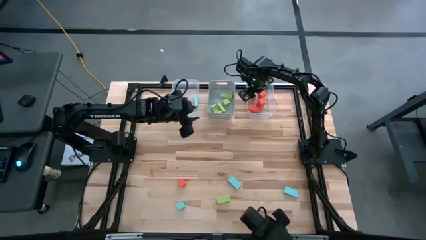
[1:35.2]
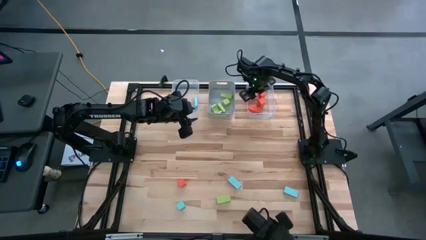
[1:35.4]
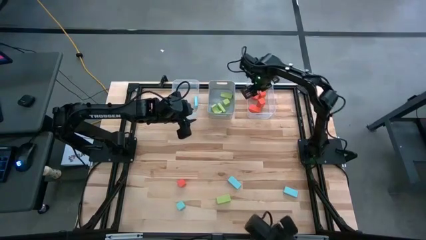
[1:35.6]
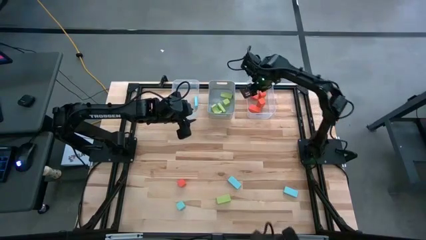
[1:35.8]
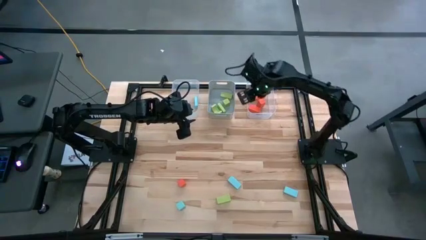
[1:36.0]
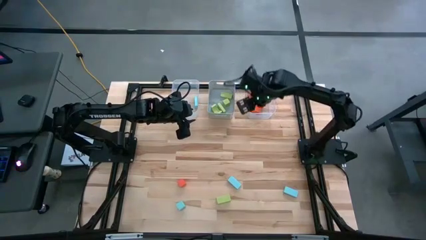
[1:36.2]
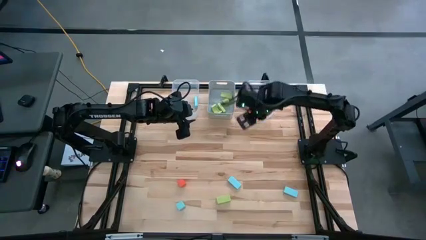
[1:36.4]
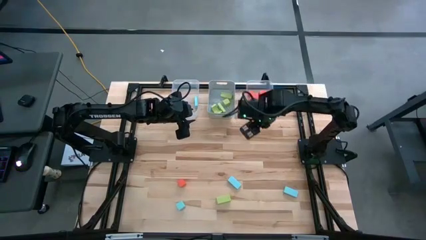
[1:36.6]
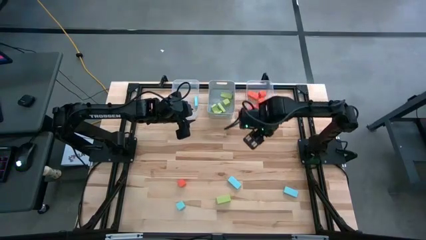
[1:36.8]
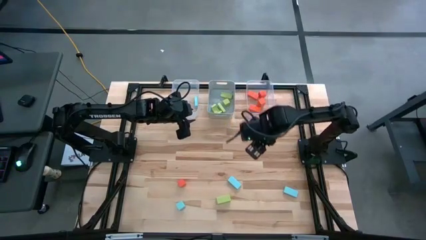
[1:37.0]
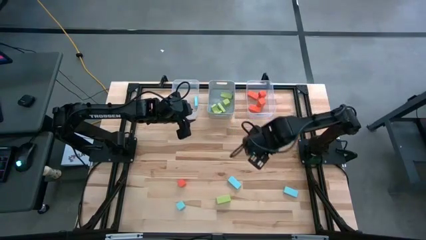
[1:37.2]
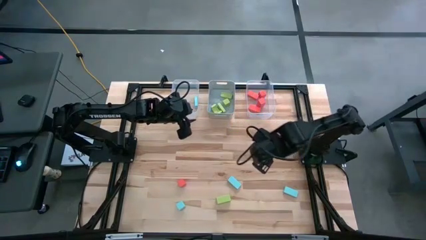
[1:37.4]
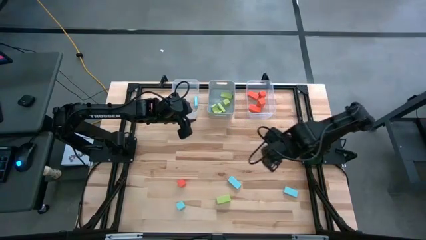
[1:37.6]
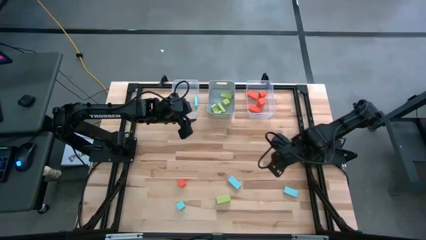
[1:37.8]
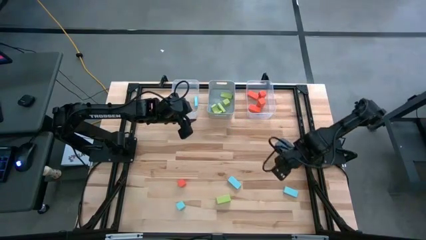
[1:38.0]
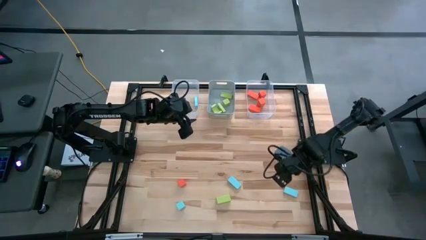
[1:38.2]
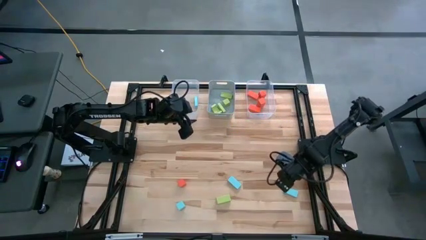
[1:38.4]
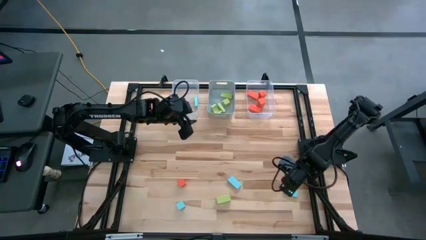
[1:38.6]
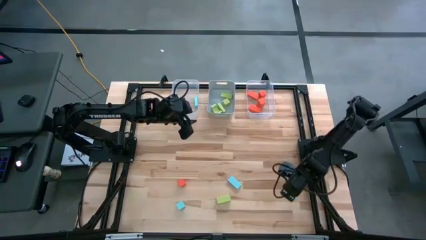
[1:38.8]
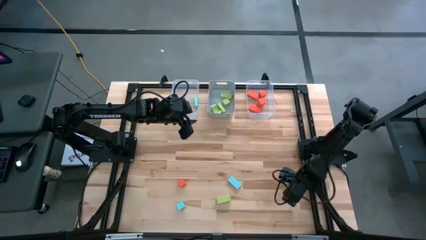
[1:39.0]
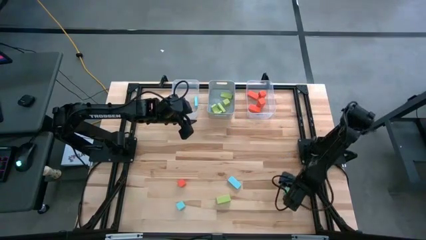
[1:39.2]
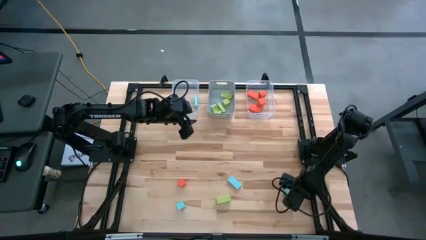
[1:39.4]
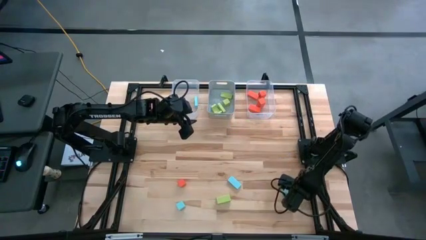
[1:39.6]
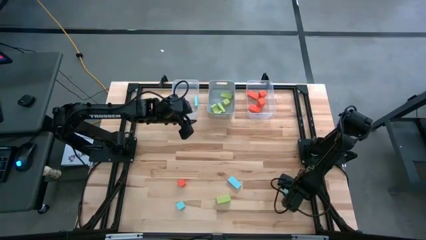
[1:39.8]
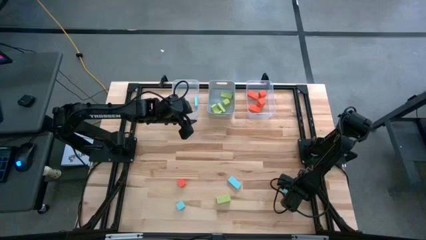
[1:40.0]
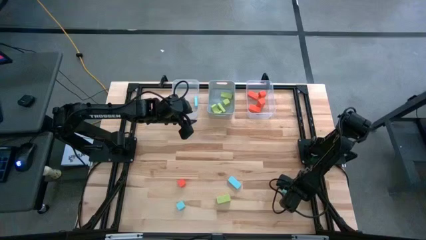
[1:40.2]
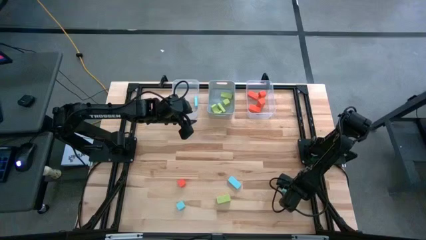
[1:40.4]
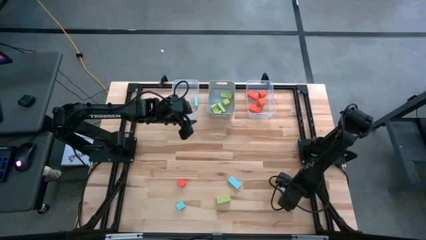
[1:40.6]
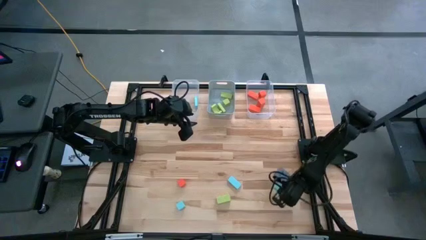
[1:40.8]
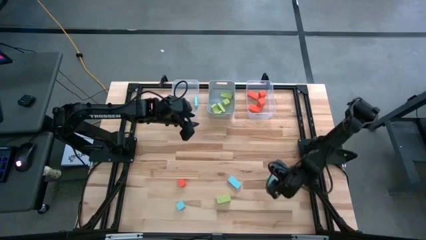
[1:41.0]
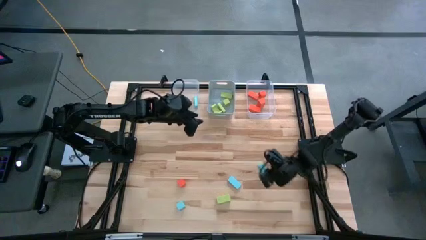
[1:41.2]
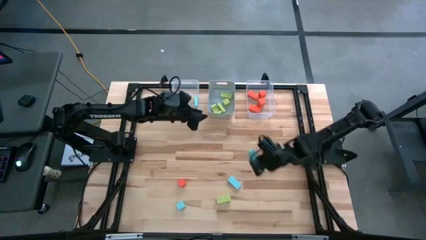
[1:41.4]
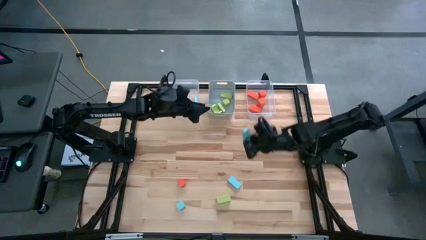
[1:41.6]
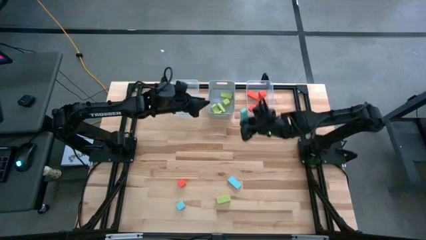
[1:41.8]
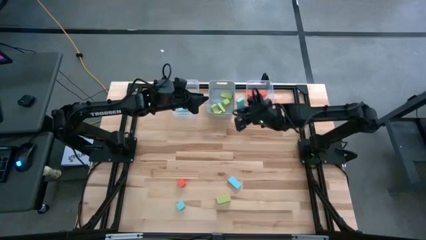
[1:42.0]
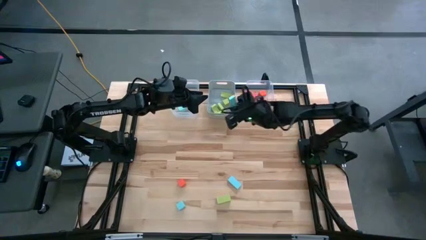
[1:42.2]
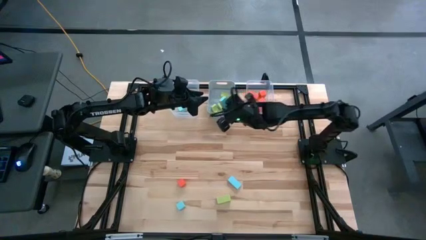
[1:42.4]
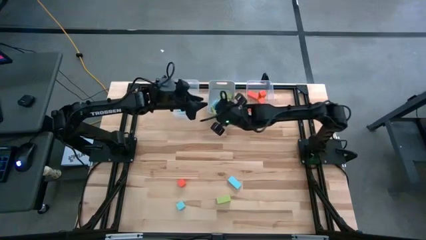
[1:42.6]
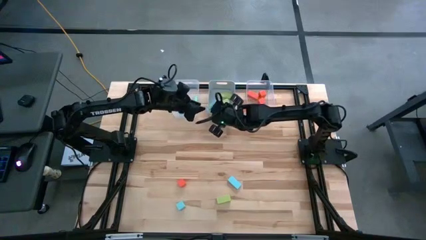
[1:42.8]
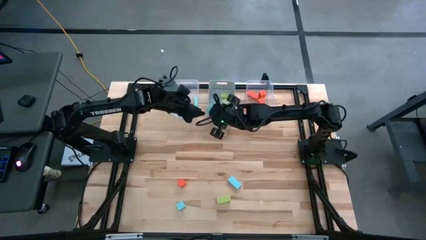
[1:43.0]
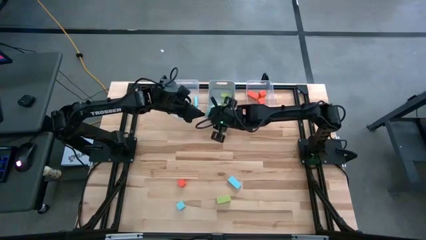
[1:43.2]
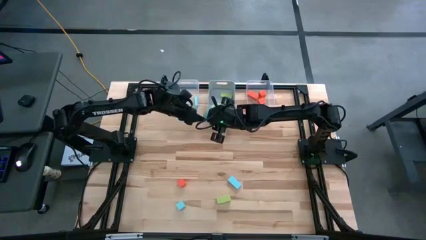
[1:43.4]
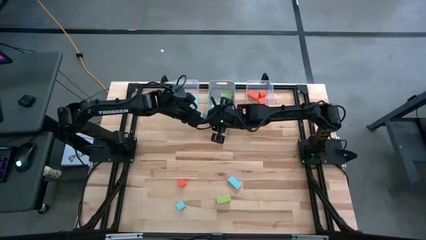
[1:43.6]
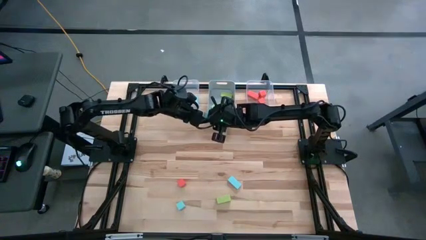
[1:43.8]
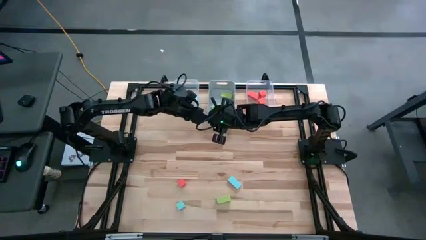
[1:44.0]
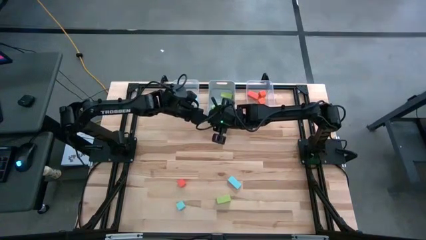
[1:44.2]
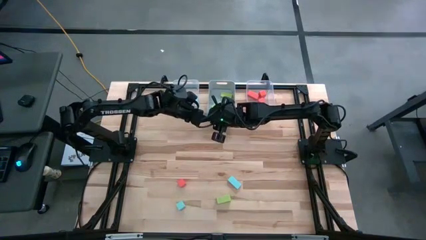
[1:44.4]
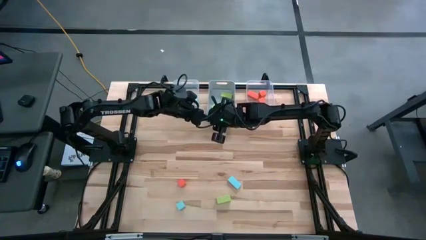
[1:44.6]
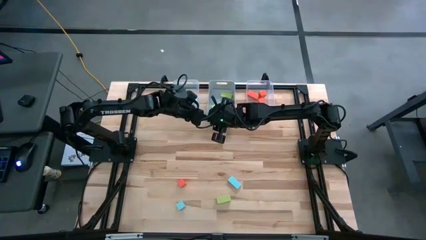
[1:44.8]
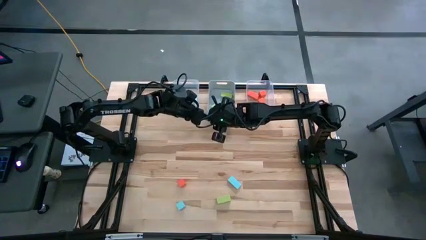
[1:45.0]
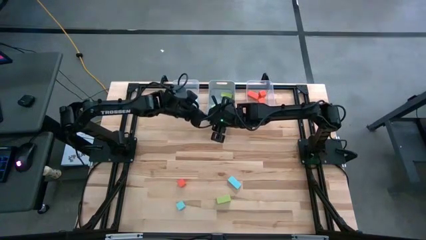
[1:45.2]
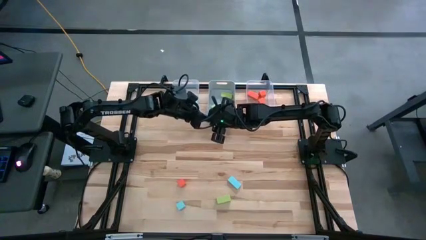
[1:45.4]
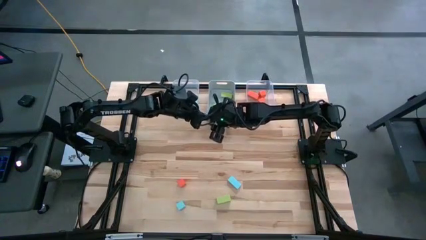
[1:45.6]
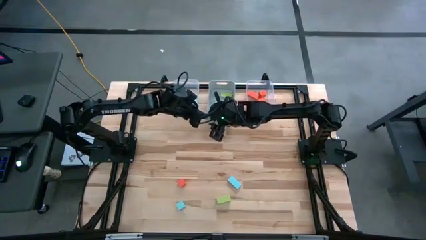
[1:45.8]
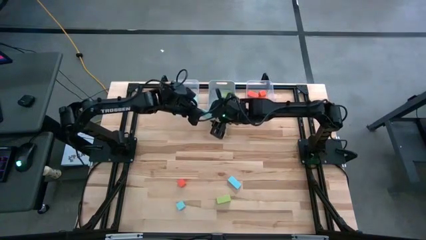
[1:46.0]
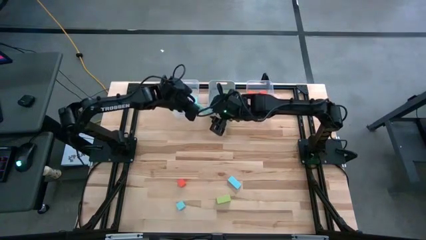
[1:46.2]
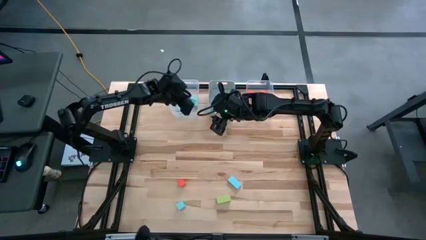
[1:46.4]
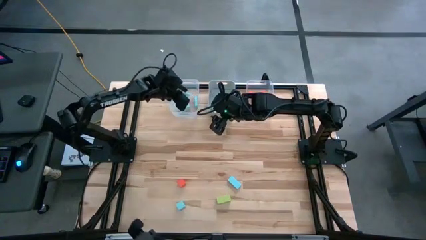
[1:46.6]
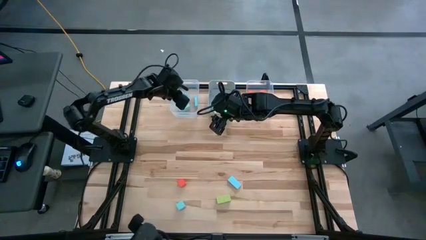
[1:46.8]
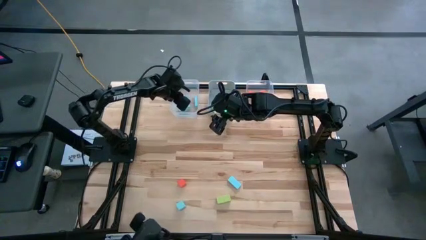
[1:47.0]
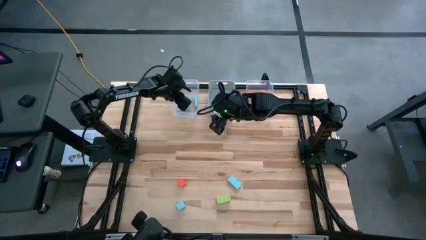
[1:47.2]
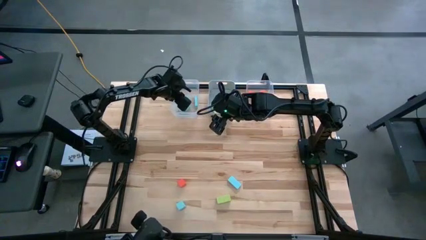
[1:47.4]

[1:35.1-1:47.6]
Task: Sort & place blocks by color
Put the blue block into the left transparent bin

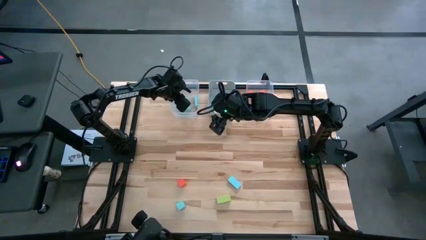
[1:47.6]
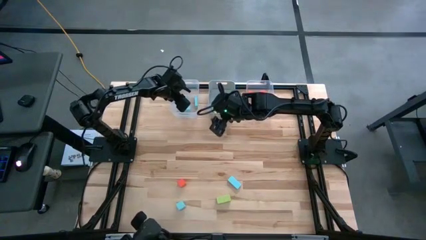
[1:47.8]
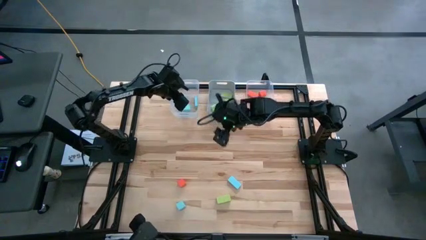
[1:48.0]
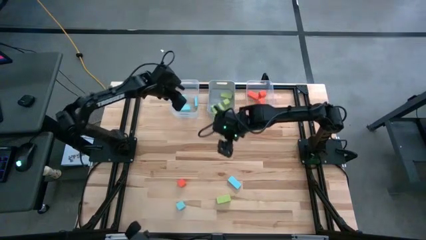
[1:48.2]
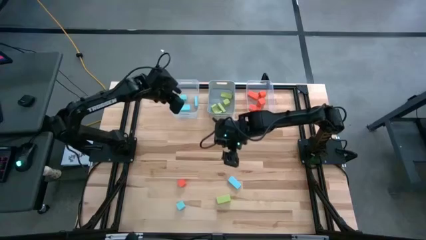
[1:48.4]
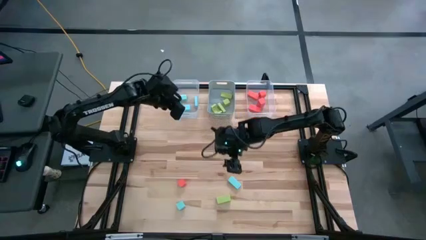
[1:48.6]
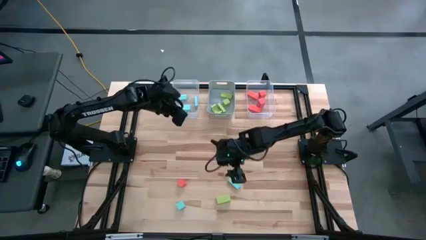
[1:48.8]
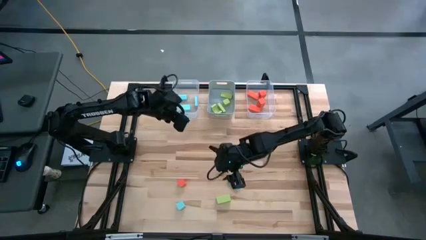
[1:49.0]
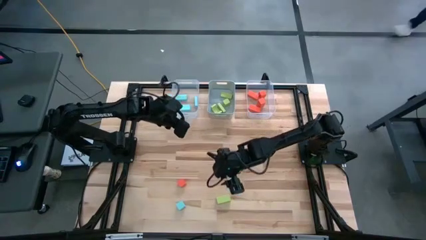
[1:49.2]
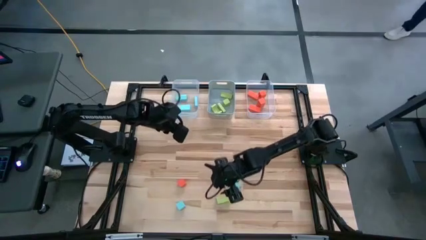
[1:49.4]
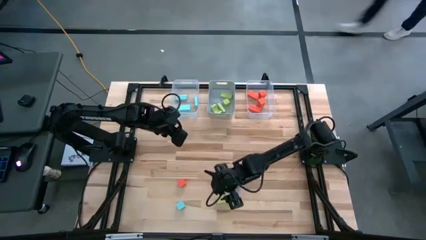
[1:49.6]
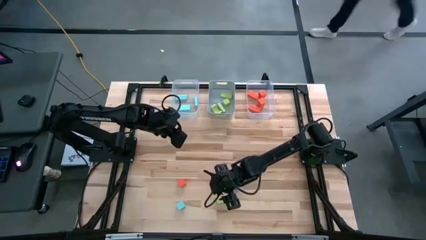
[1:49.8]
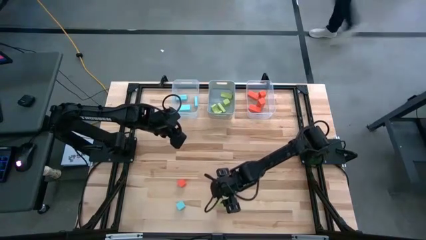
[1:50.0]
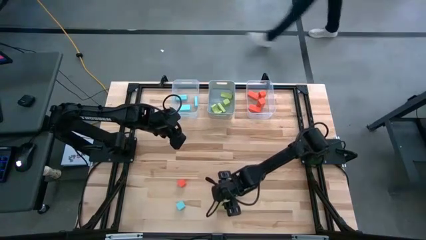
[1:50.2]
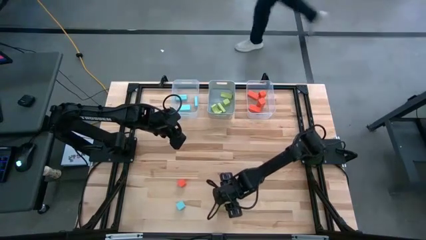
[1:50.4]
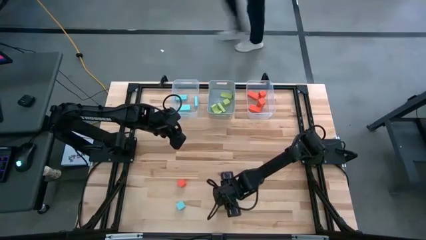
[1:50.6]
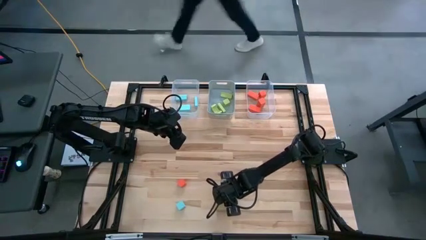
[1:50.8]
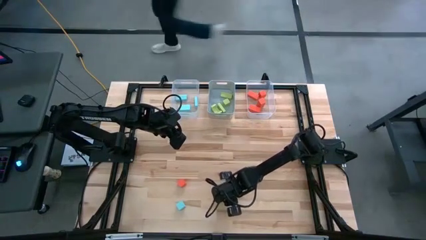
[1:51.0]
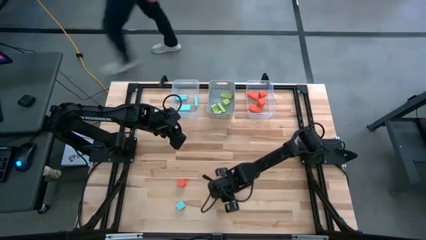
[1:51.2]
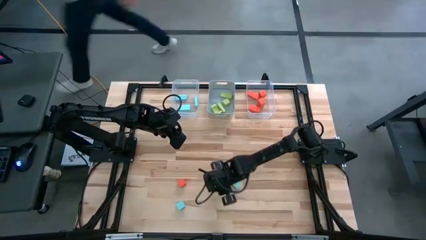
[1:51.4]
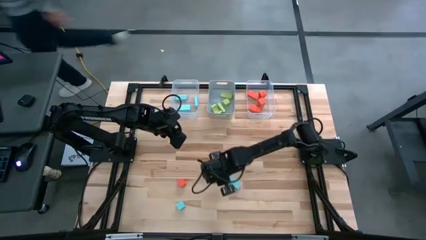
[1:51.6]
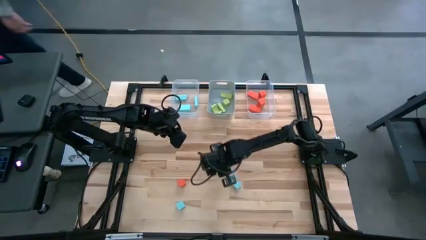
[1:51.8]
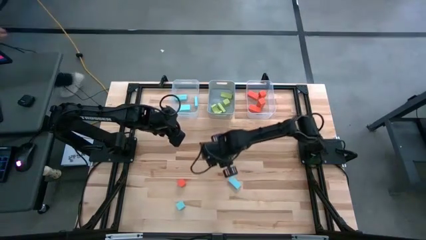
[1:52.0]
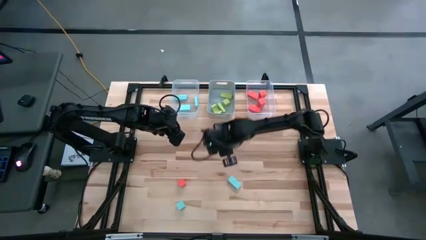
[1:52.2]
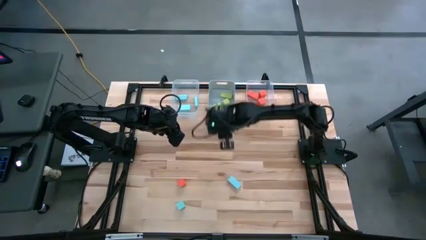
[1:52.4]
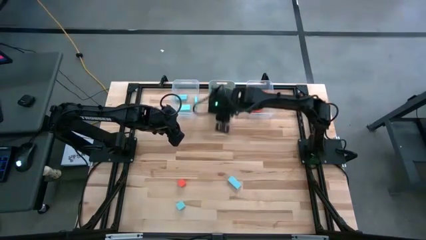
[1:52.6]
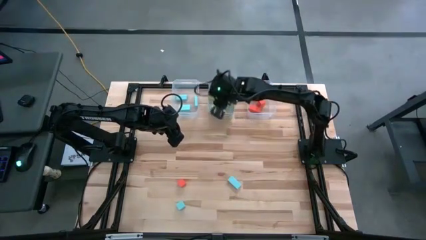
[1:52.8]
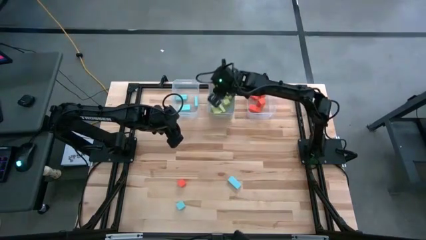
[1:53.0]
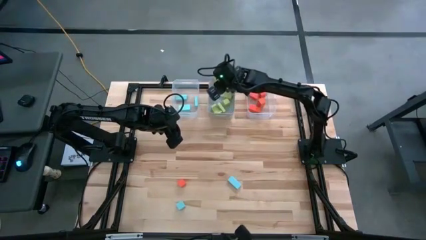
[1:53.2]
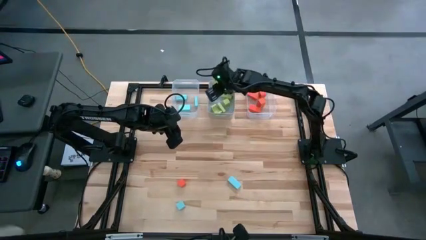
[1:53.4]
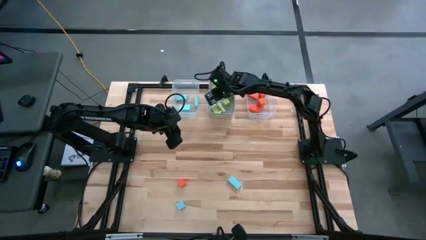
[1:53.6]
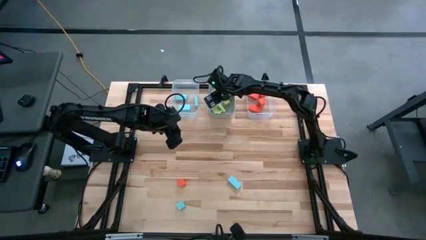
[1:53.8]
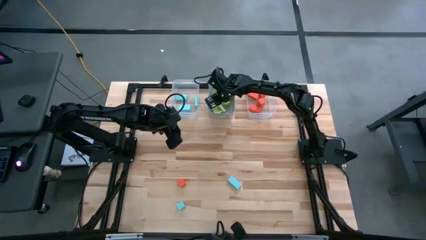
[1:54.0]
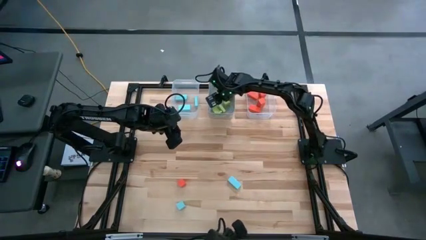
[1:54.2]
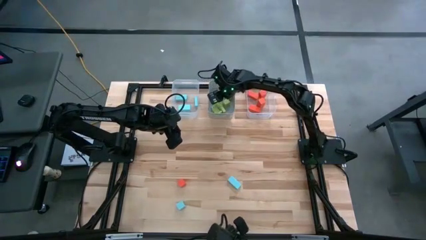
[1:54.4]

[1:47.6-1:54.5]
Put the green block into the blue bin
